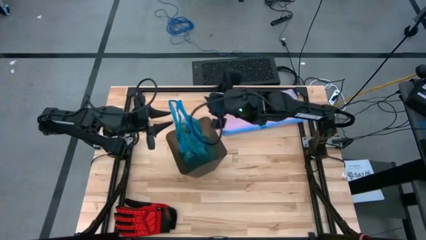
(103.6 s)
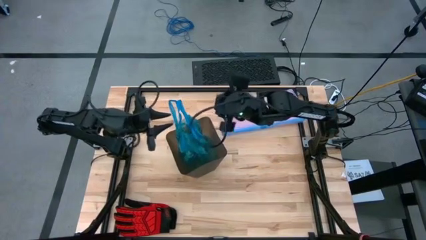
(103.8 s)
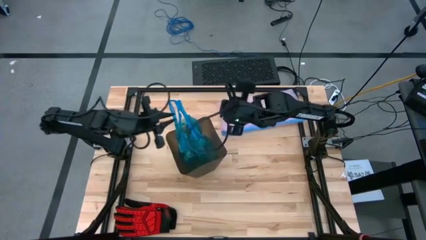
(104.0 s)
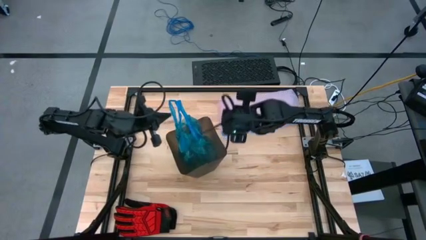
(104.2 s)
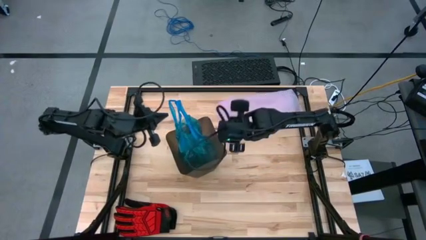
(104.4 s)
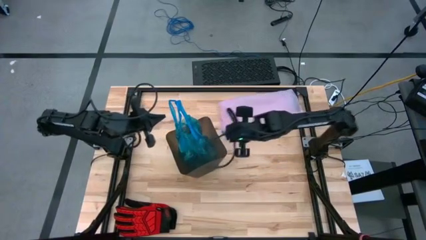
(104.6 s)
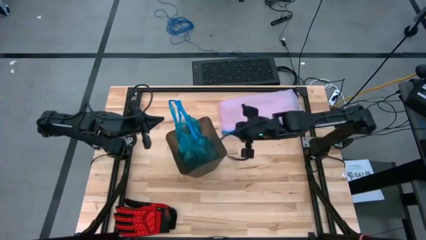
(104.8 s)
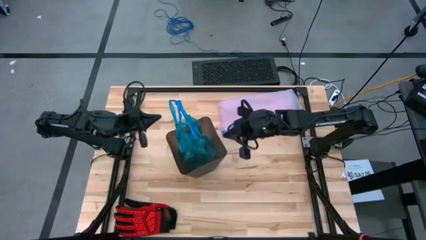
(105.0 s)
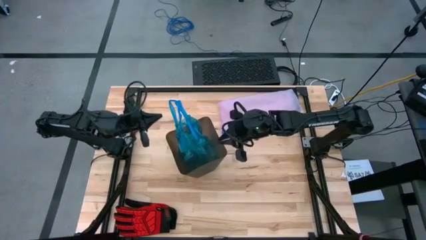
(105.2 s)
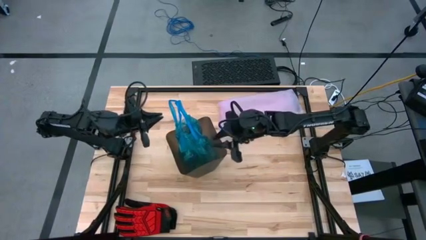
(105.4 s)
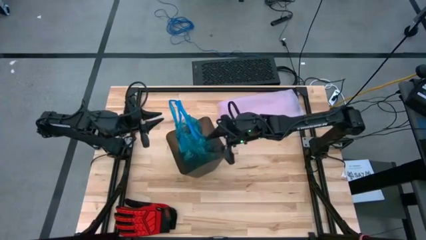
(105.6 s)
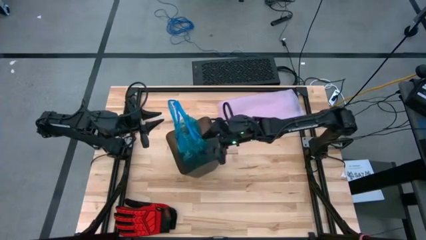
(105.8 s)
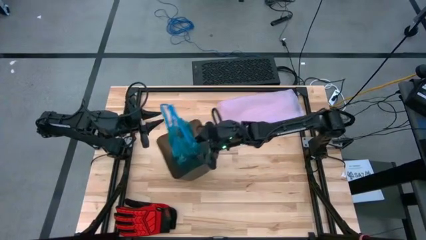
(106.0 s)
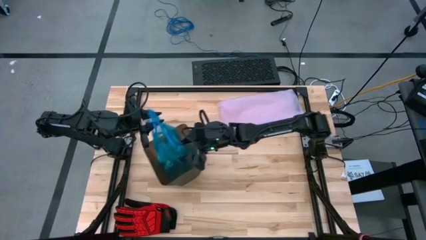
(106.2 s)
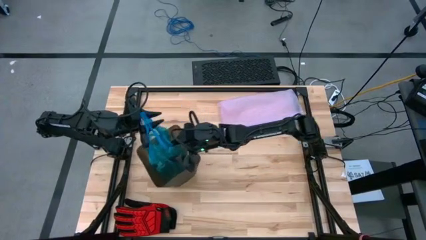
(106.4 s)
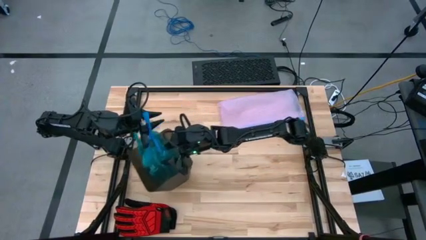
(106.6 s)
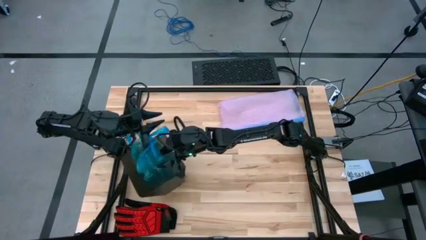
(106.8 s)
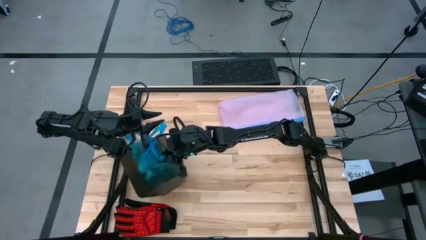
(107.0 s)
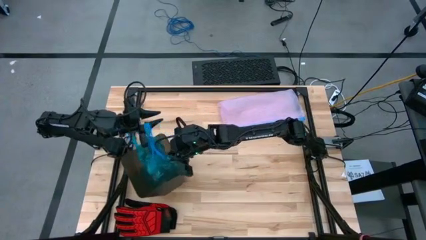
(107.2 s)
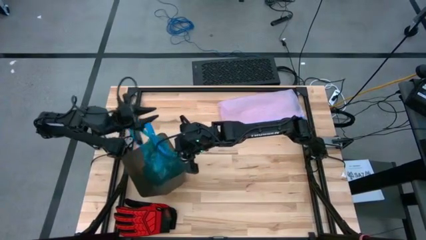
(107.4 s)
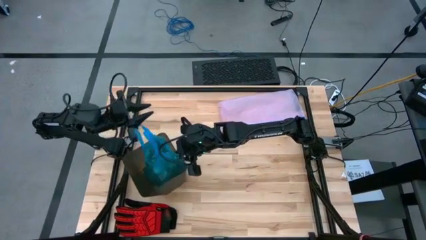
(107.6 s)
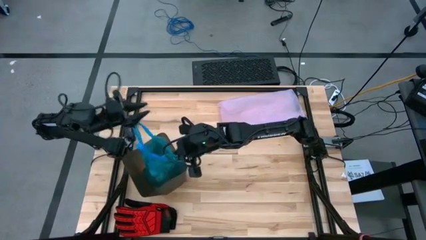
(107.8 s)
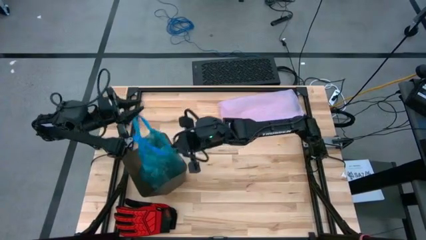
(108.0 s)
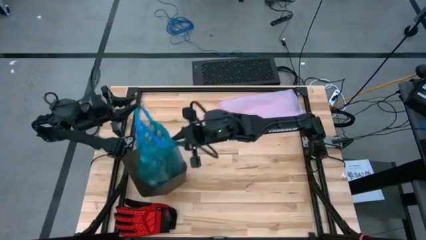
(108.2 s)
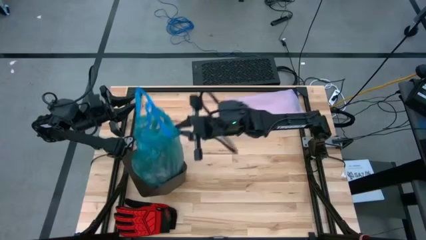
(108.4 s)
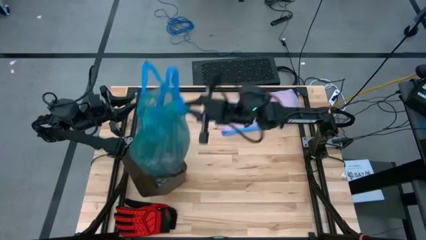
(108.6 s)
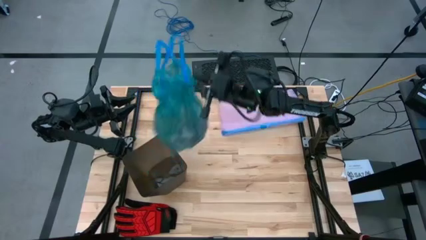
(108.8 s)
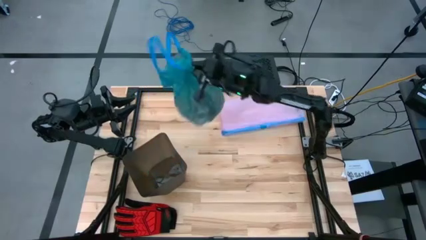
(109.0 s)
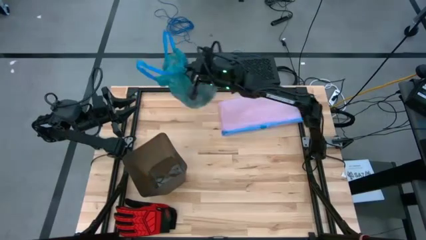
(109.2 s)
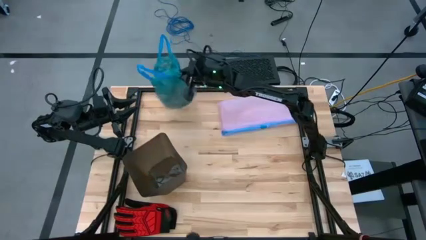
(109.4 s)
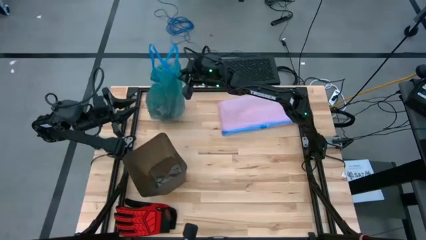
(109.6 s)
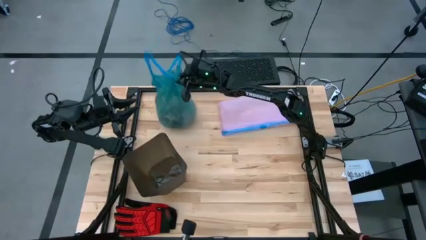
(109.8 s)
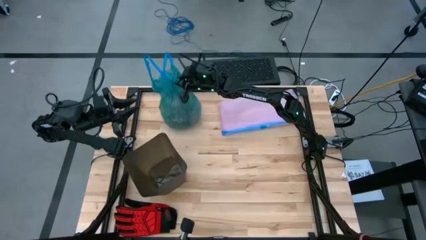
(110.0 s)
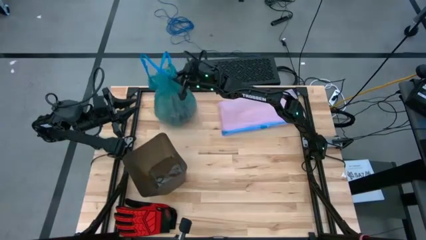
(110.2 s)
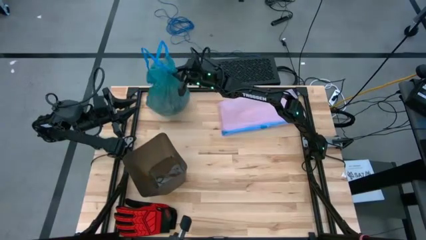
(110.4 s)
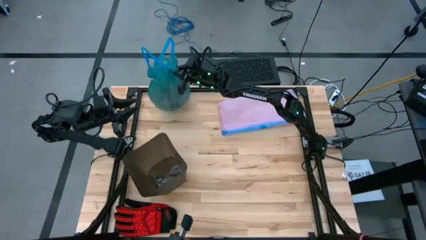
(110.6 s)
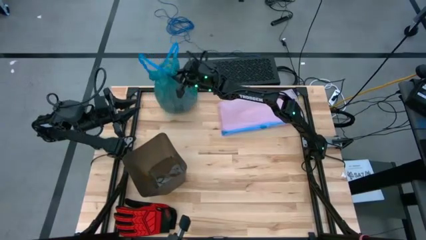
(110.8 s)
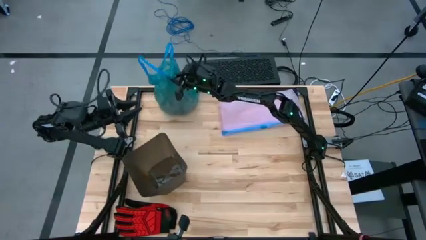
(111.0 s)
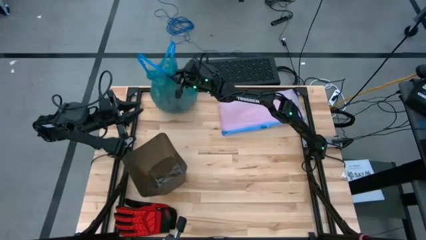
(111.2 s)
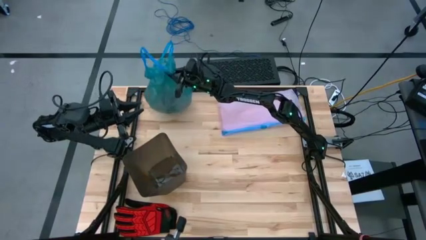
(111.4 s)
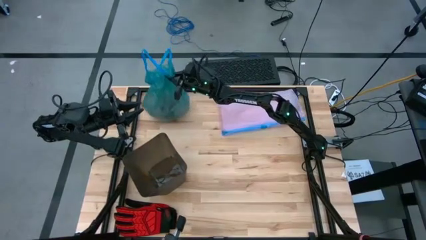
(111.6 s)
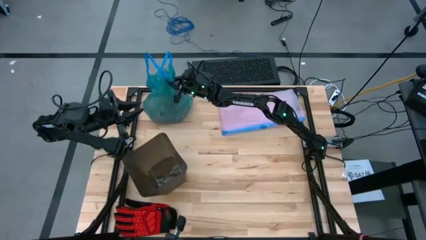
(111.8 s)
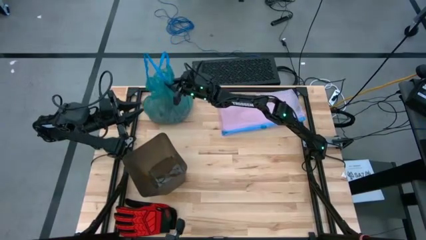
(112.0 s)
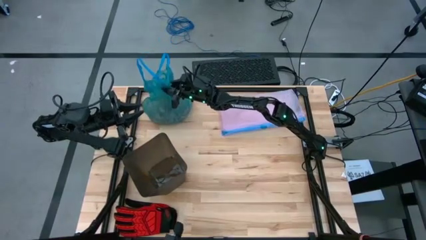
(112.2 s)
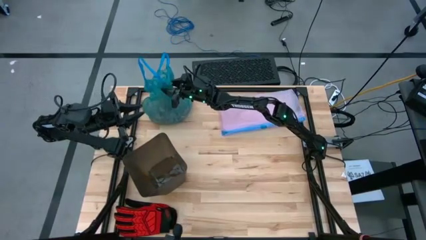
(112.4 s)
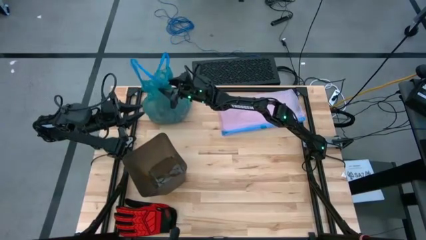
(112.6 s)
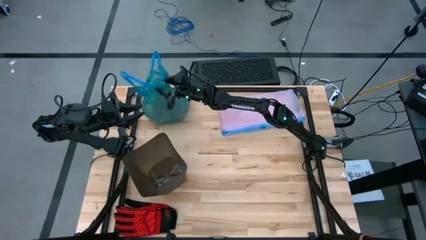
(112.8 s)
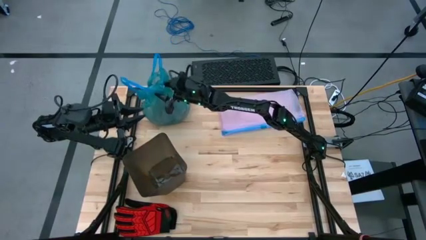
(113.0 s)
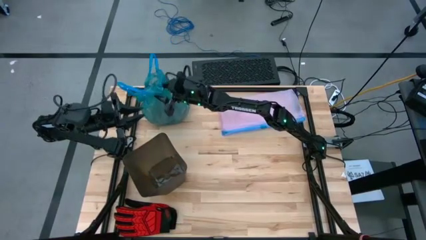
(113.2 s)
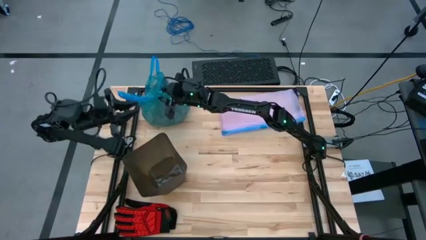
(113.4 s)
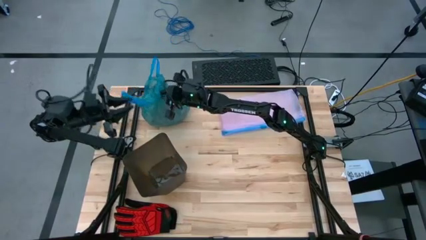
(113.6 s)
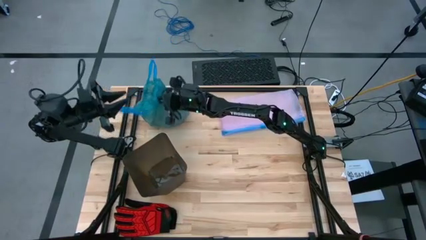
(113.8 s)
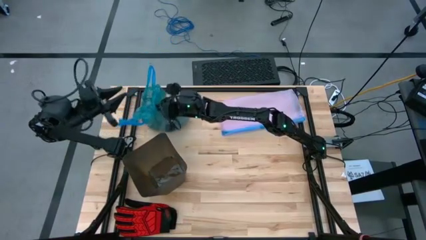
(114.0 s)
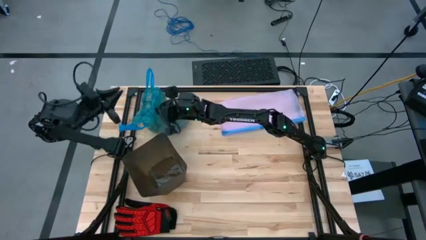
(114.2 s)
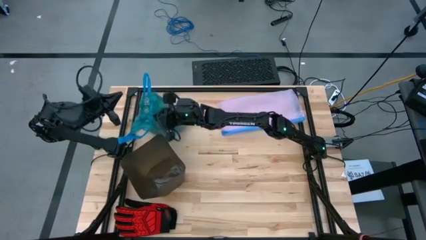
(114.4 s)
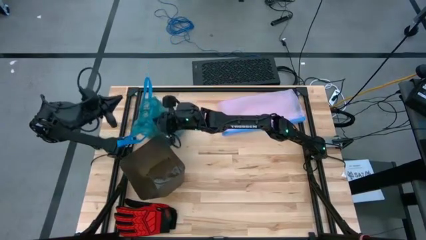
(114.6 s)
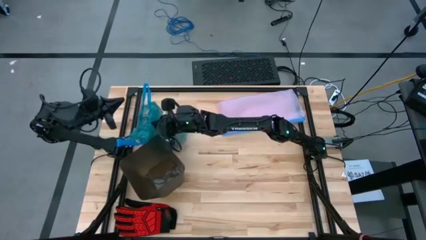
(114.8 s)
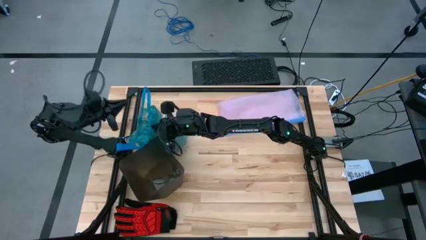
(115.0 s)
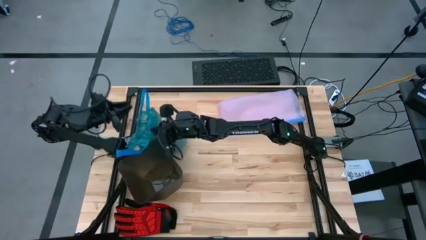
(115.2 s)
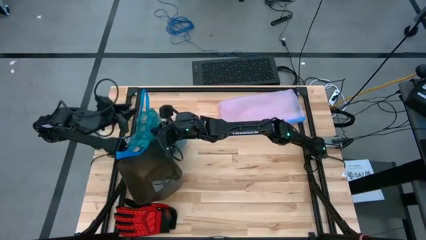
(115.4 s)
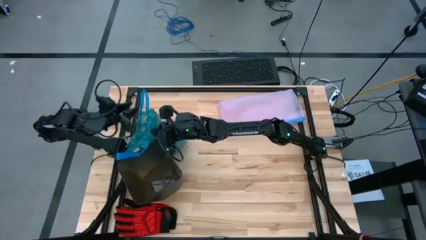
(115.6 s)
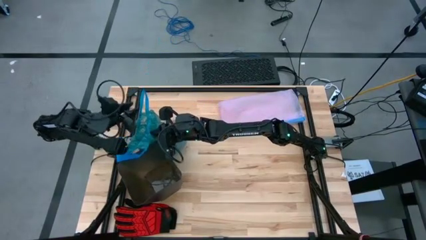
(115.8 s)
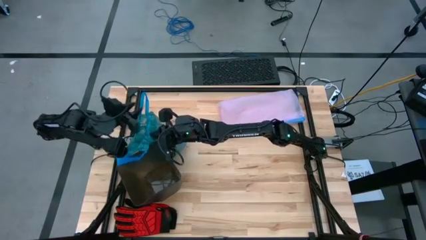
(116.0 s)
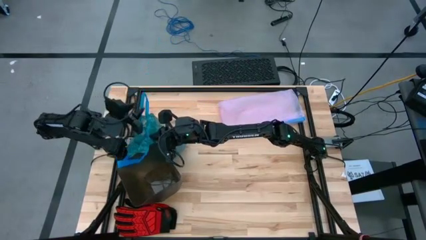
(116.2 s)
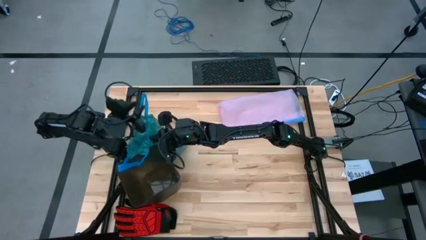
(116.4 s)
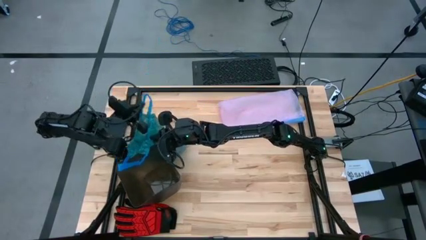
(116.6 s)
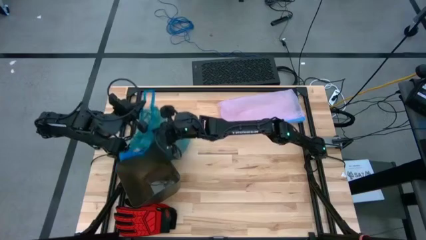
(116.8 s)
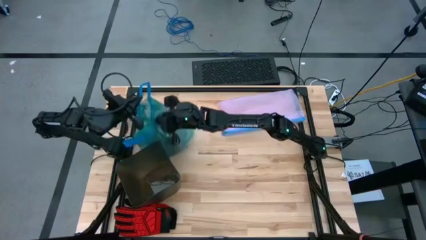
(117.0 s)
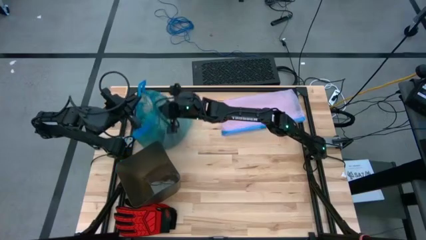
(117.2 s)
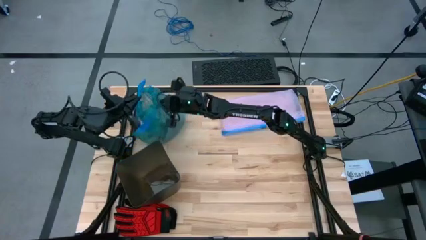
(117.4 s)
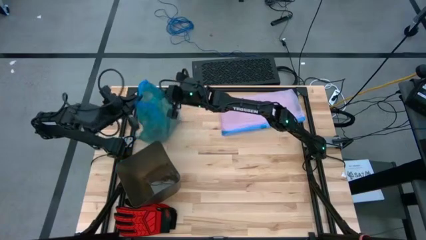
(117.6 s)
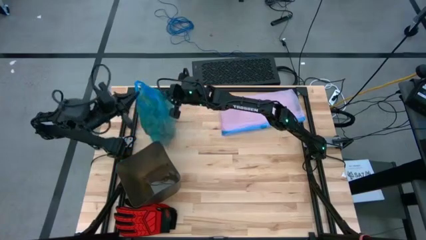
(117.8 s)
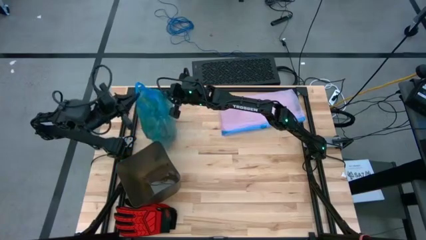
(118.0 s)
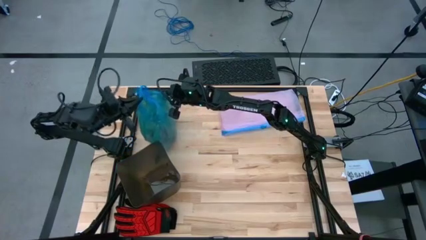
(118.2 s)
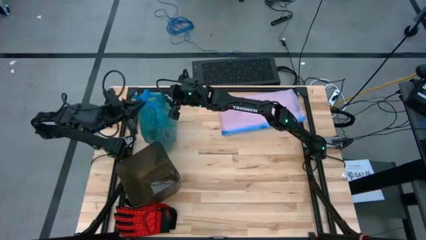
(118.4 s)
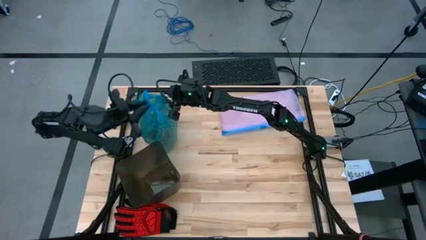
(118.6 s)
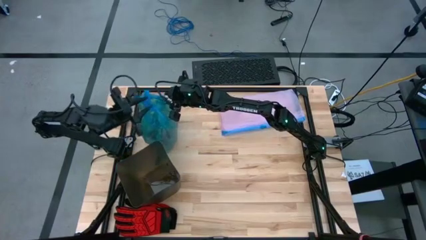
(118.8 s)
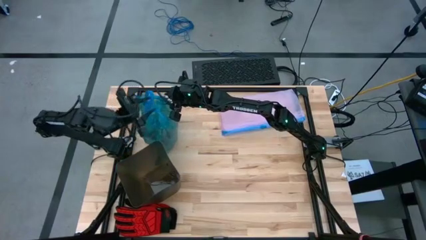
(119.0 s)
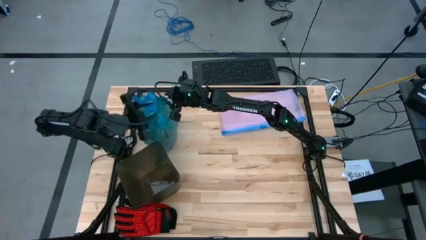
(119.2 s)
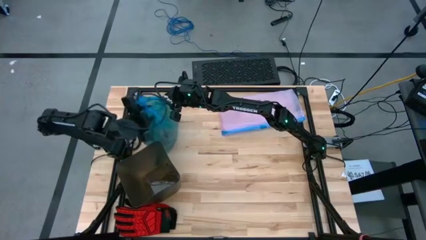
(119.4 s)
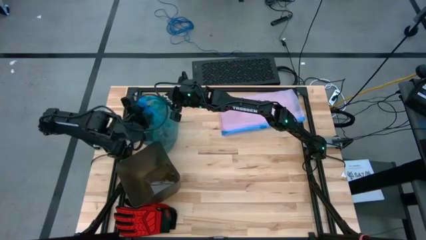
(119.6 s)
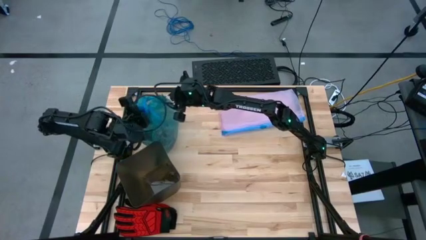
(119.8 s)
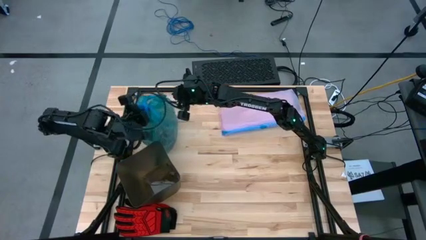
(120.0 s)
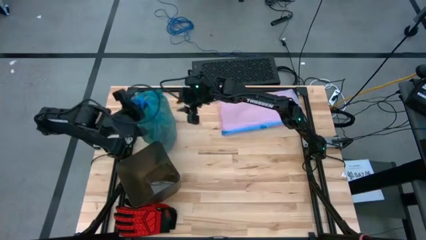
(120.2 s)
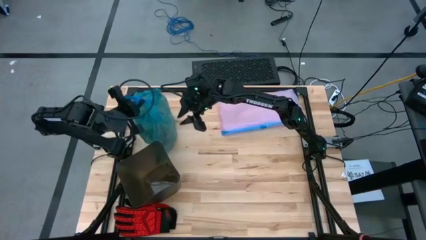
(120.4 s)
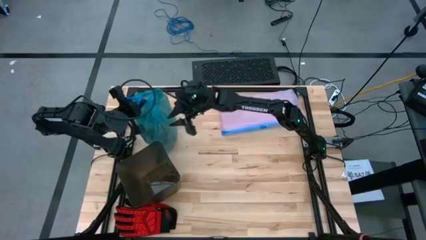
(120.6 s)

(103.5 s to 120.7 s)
Task: place trash/remove bag and relplace
Remove the trash bag from the trash bin
